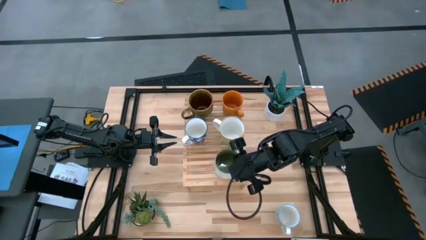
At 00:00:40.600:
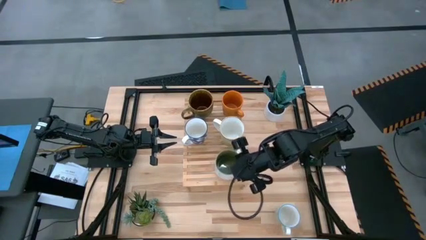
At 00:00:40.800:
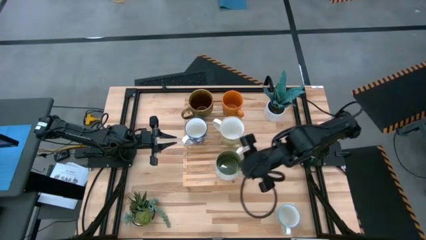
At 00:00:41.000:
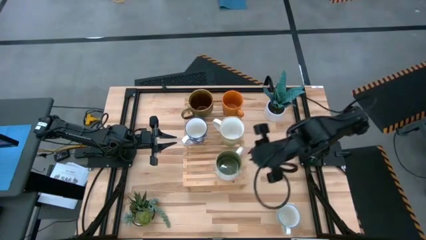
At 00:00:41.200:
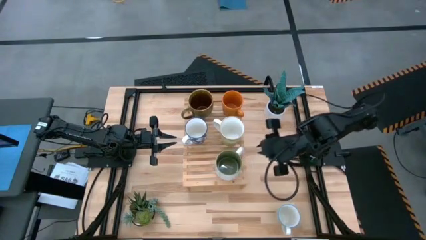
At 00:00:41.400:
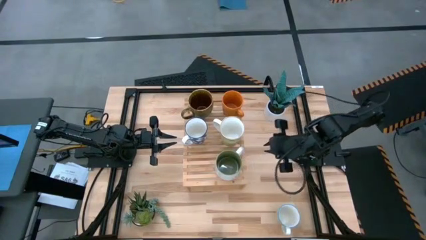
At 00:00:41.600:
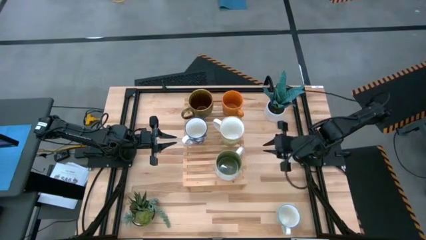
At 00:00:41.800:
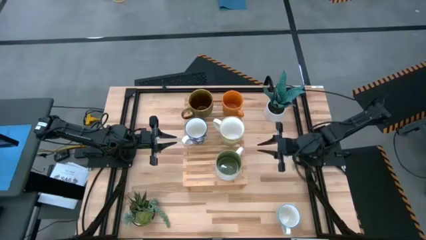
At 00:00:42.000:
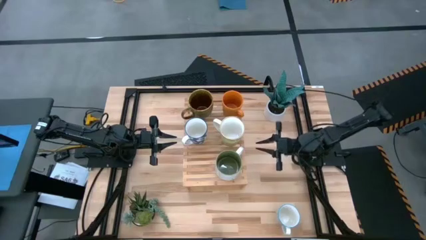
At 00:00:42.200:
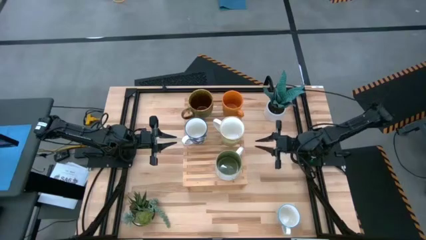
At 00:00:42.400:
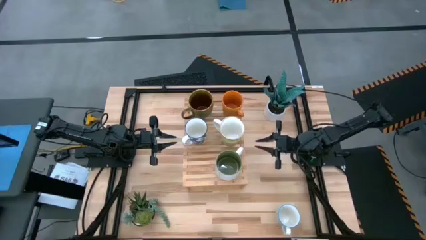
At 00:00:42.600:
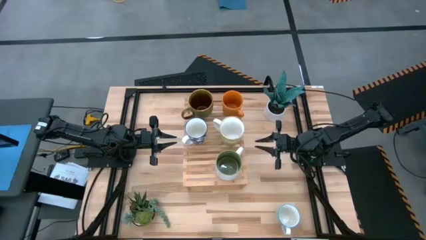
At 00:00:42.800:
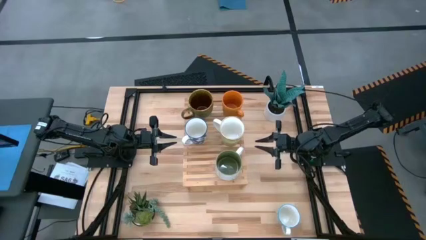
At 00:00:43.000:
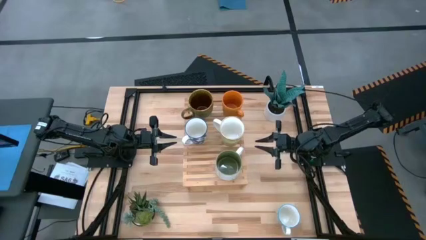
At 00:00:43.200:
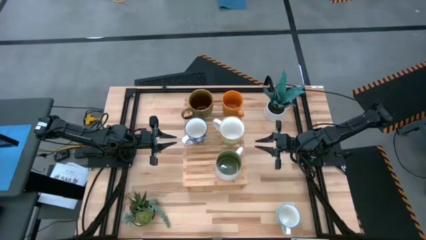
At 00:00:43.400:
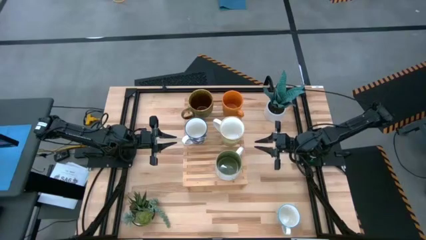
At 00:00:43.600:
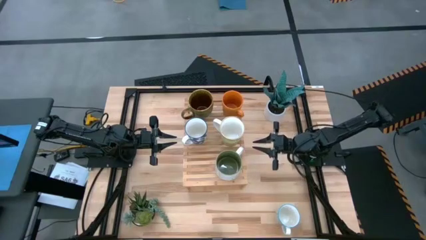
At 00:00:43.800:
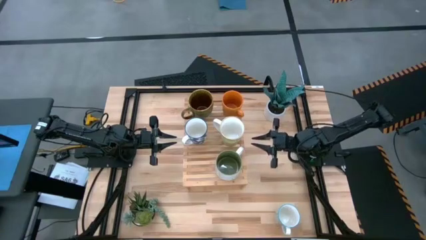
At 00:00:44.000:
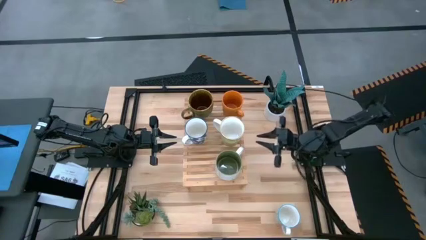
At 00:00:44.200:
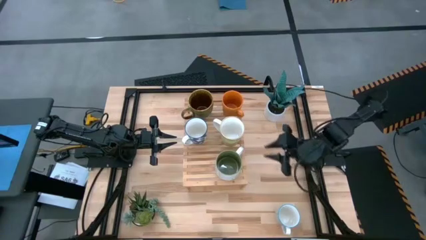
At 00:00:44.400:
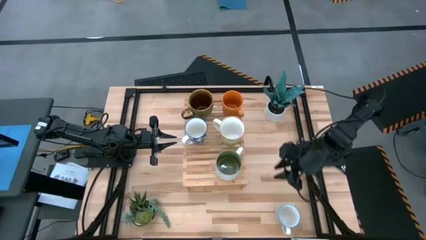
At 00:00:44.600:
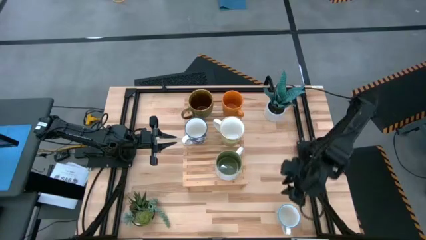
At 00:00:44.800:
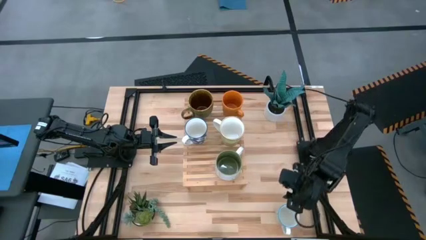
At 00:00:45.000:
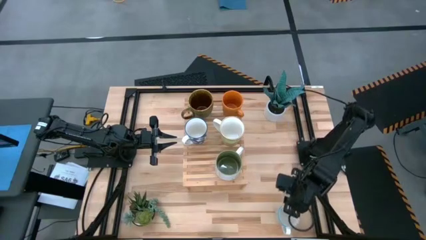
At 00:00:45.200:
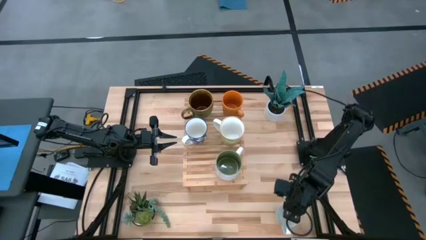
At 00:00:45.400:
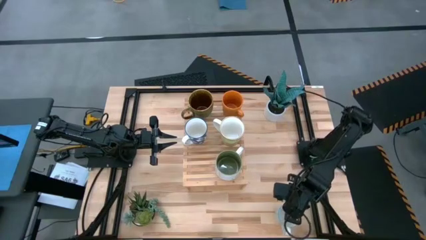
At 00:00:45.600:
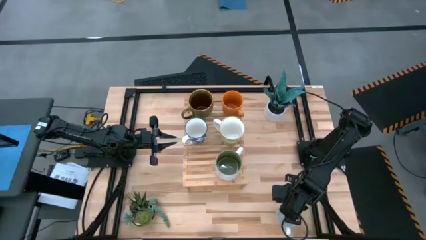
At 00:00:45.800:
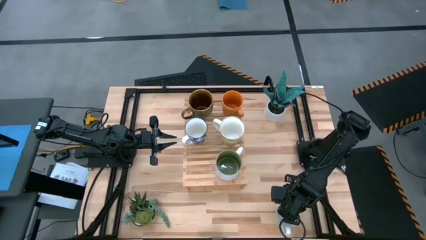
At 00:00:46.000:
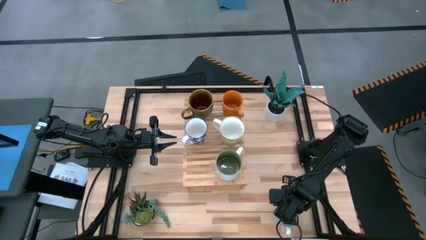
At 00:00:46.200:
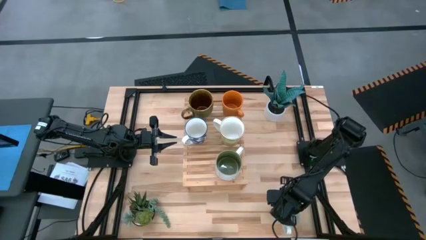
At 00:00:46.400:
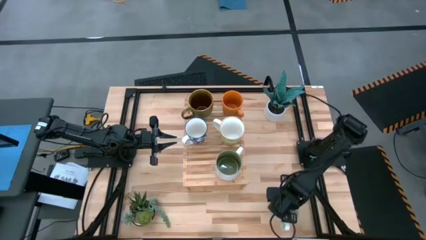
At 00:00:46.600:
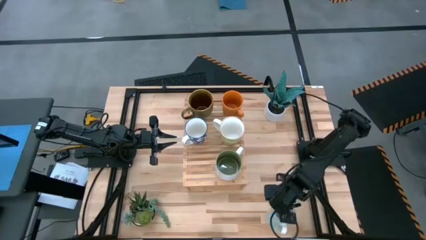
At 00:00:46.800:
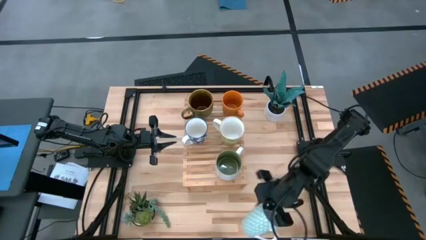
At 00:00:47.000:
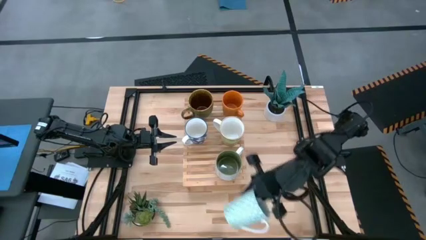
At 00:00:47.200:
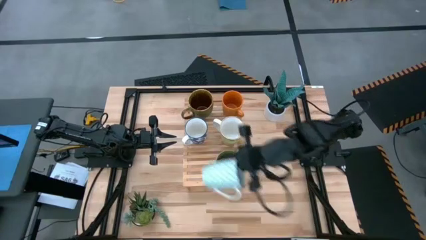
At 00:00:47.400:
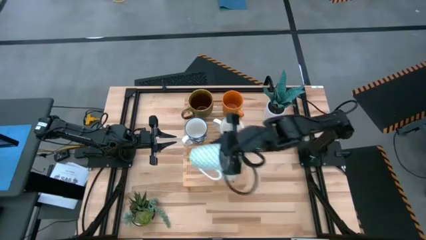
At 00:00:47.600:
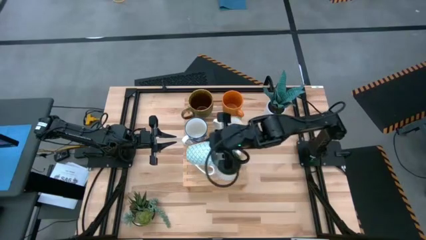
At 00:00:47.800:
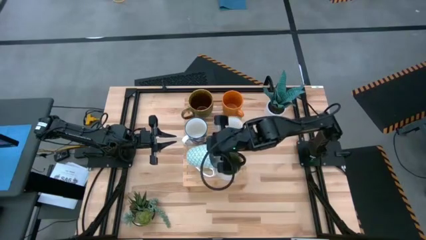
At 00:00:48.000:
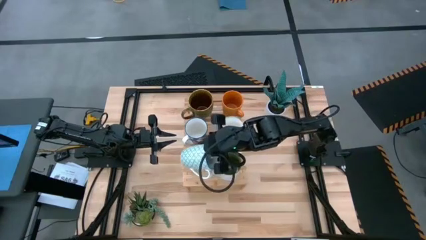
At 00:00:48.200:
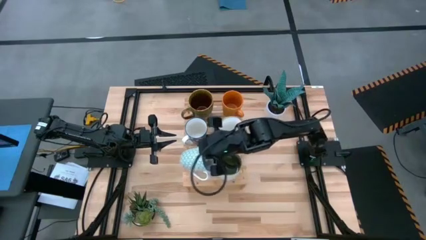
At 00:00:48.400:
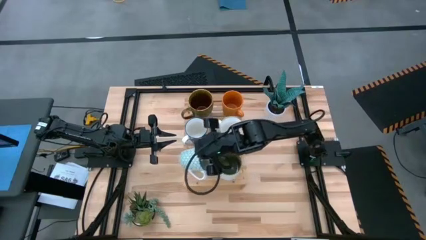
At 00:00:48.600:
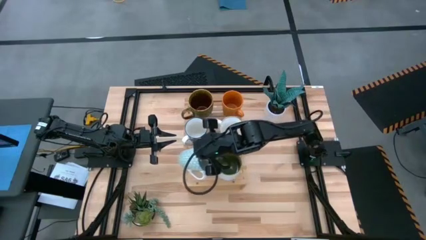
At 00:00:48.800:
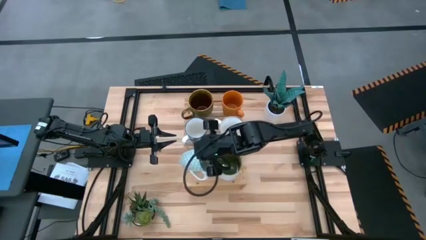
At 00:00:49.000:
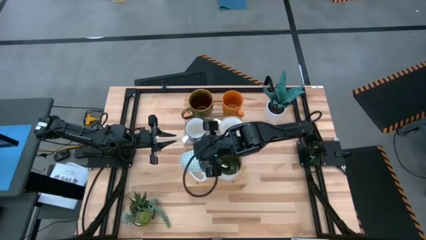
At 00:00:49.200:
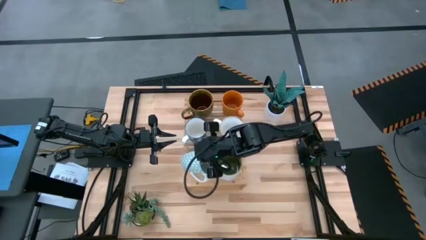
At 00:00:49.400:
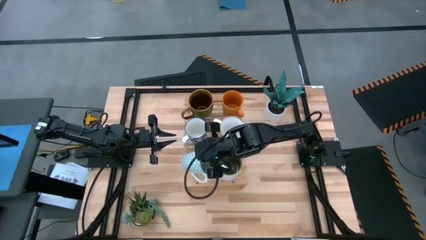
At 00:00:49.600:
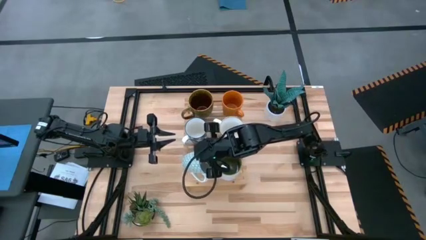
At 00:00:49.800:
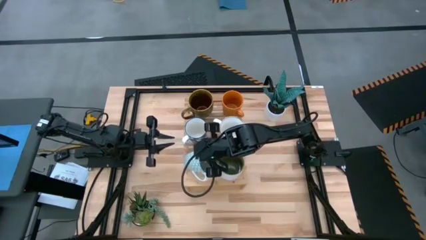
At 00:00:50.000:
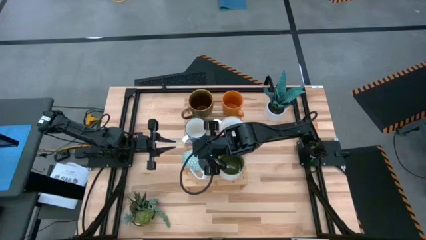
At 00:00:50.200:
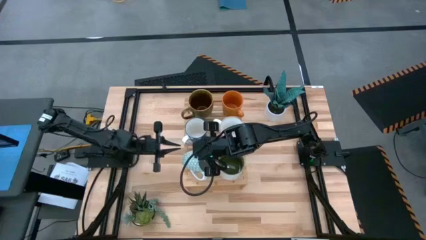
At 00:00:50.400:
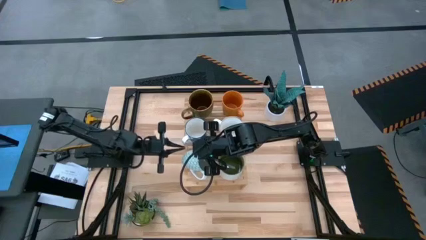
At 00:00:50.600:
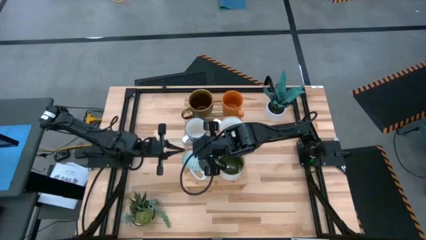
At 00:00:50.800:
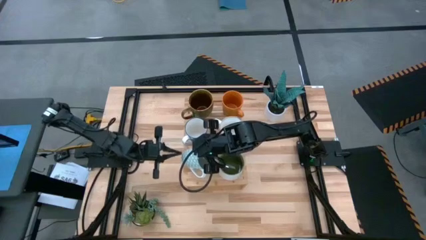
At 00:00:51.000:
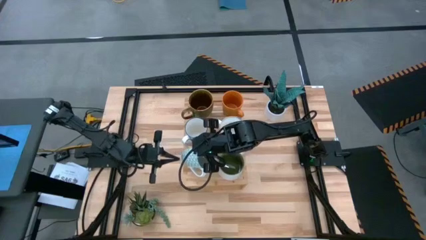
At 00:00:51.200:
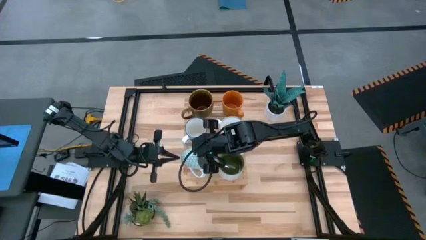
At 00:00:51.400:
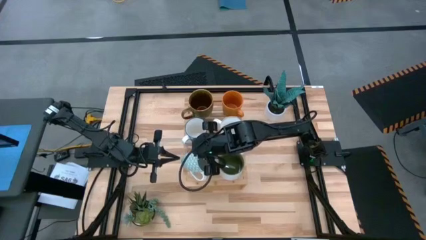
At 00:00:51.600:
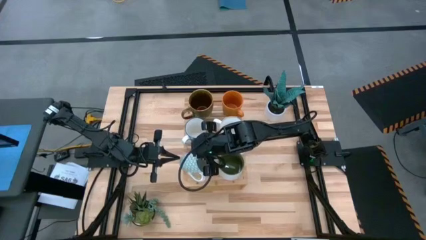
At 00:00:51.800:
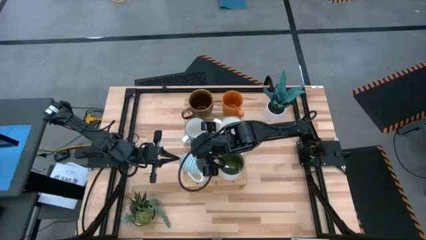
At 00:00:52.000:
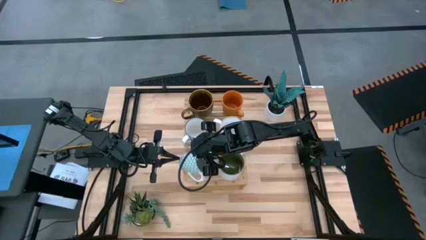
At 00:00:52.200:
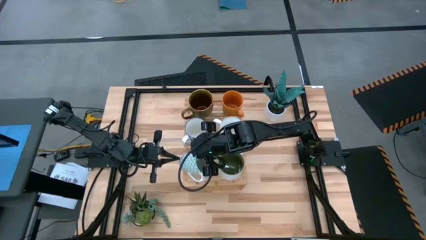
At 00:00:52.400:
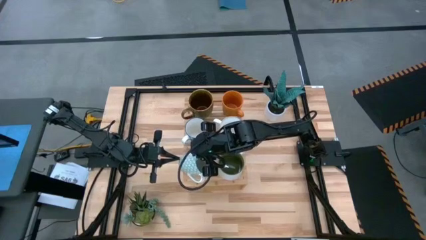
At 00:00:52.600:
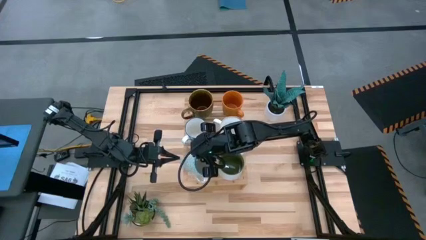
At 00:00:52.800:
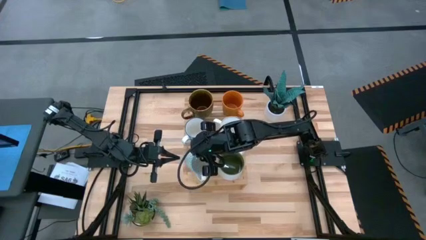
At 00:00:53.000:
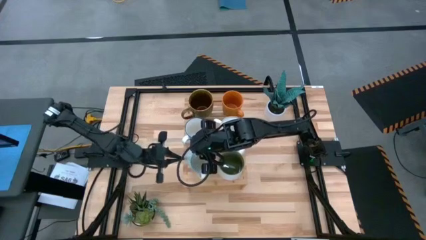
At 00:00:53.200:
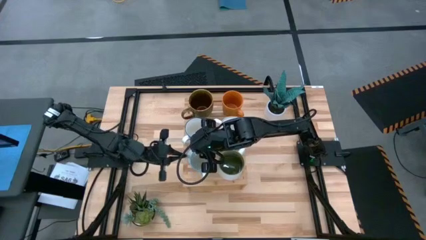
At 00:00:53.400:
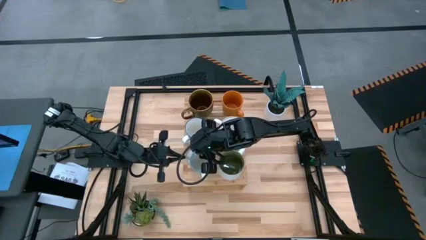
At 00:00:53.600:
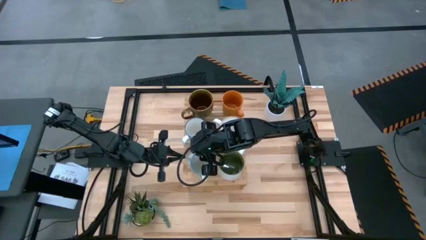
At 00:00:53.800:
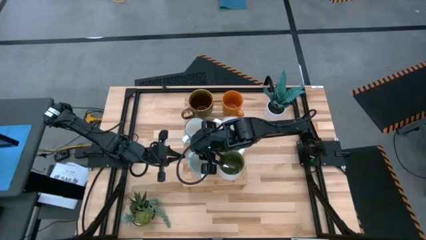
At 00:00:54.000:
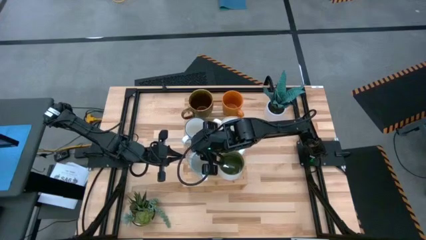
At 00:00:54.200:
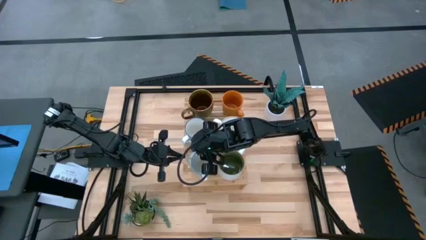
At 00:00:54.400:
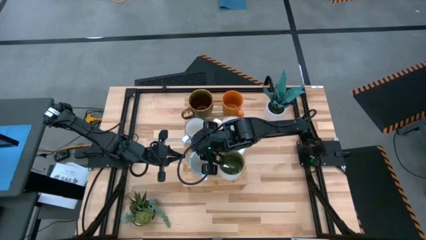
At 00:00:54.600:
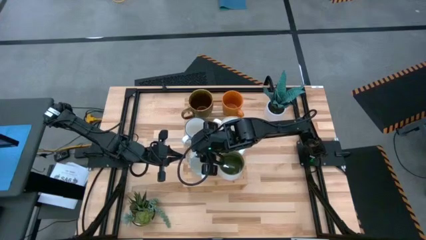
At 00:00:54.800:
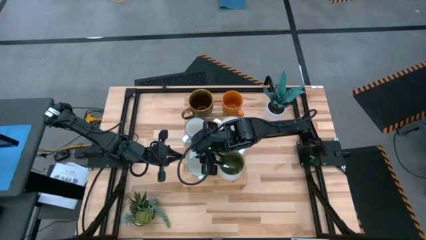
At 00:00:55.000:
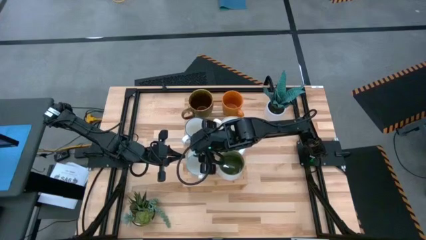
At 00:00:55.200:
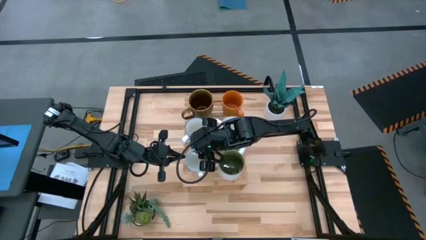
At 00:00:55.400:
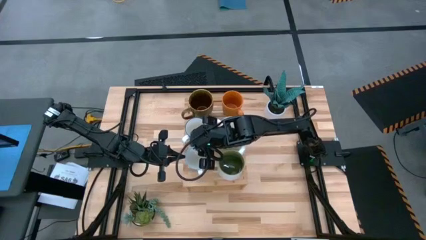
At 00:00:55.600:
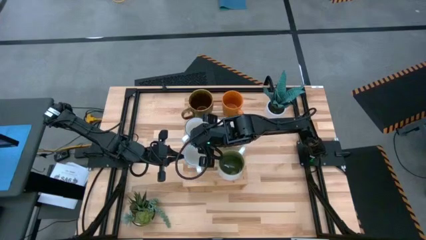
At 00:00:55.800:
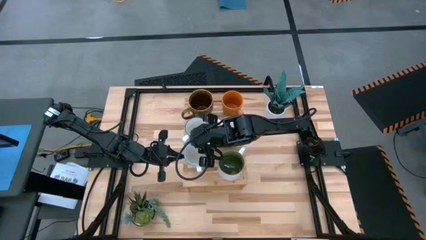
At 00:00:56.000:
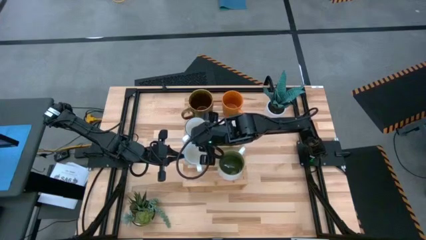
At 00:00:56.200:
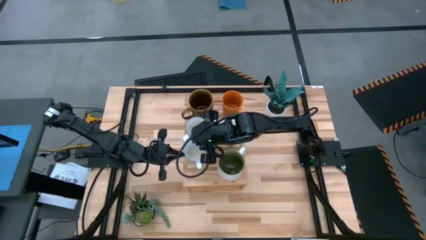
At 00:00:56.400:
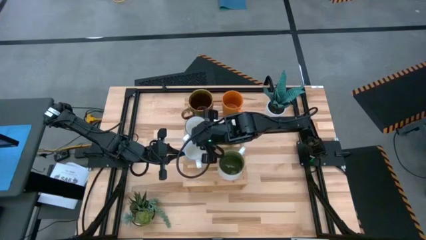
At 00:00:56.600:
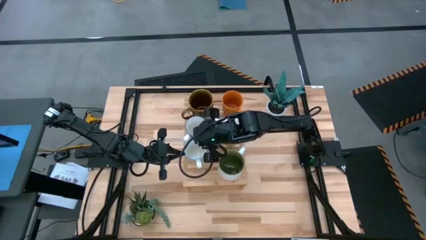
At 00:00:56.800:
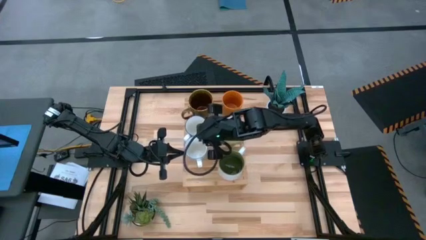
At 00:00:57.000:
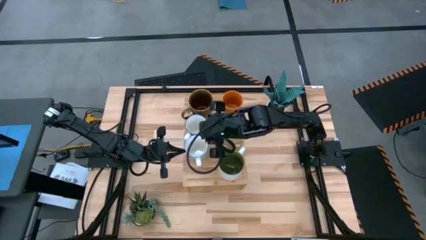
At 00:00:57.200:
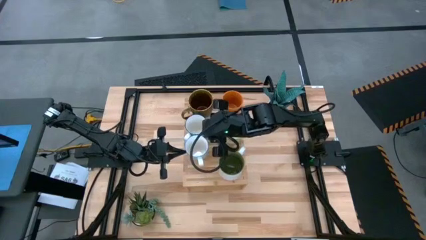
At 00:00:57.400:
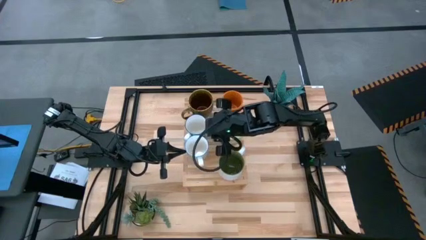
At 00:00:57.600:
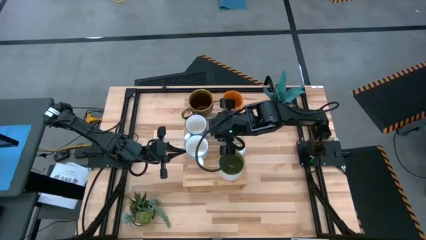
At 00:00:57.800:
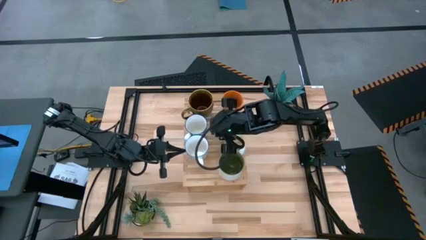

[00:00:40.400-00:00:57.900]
Task: Place coffee mugs
Put the white green patterned mug on the shelf
